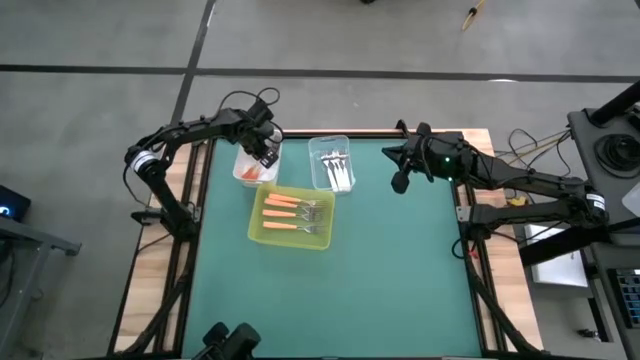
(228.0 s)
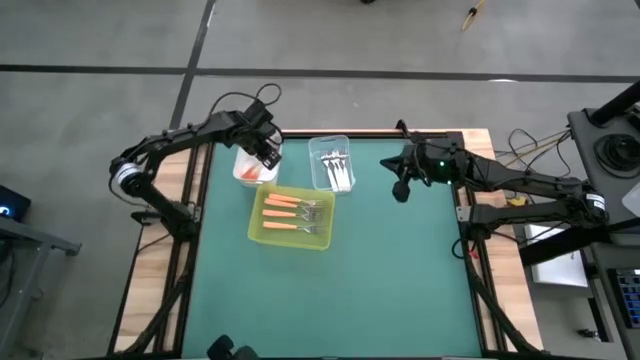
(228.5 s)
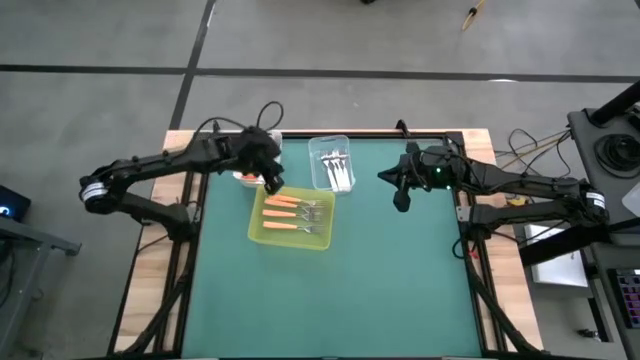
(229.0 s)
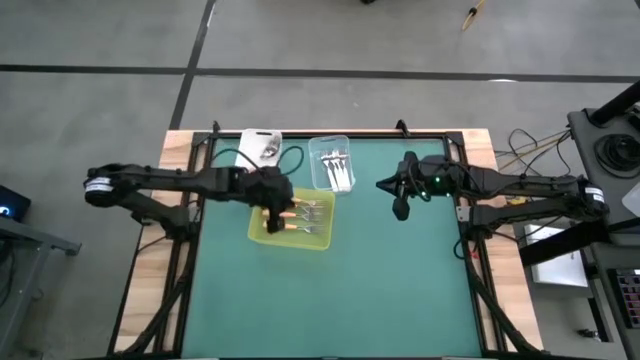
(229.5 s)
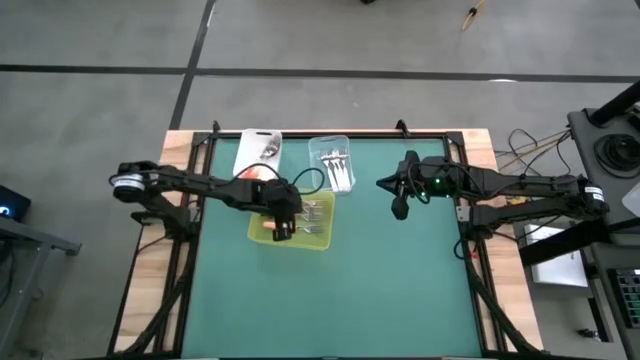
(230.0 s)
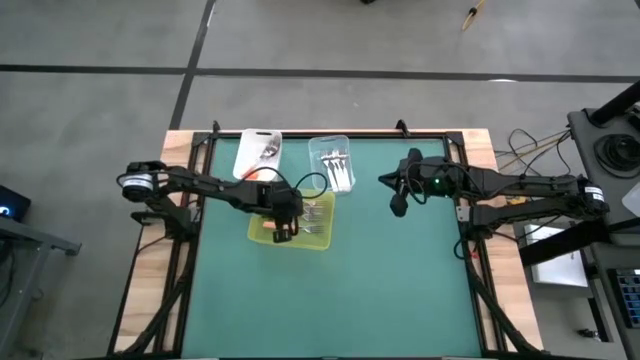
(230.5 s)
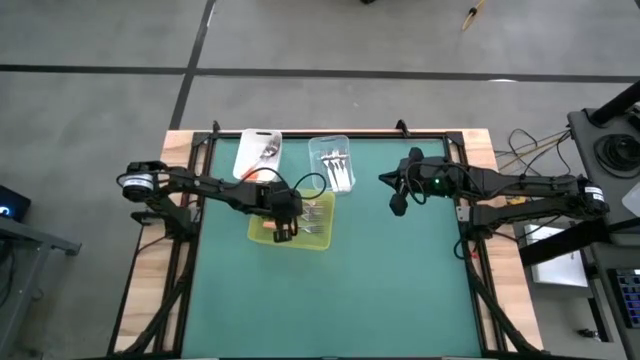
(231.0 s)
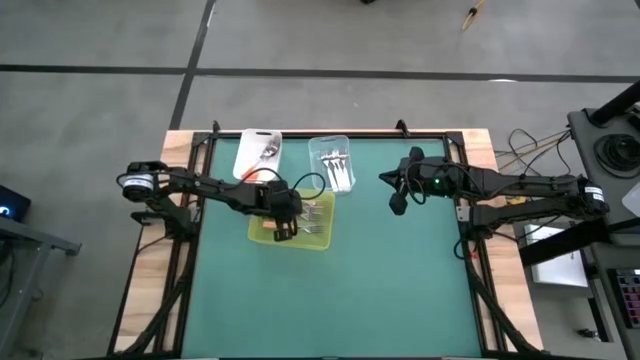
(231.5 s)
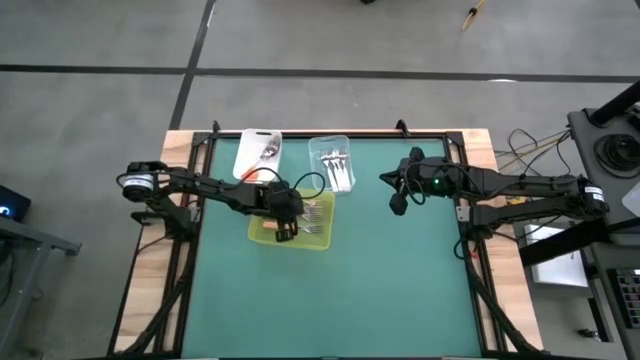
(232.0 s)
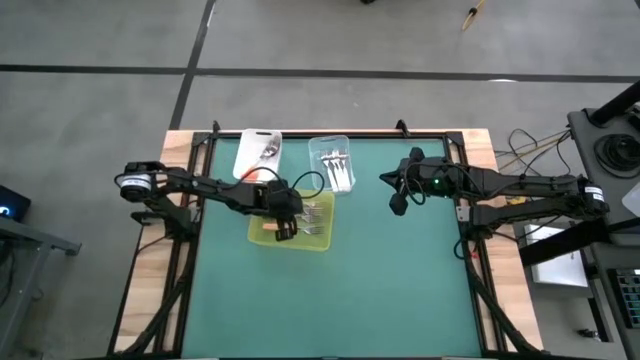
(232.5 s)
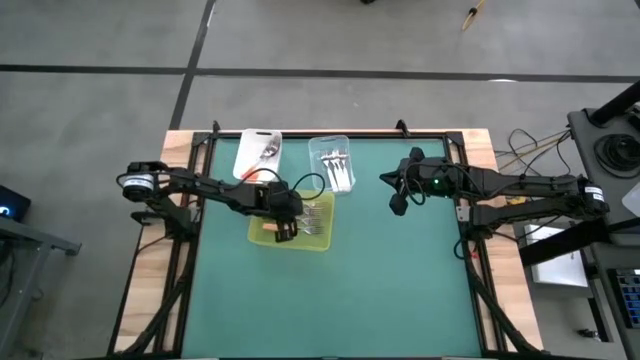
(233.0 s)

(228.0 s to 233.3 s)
Task: Sort silverware by color (type)
Adjust the yellow forks in the yellow bin

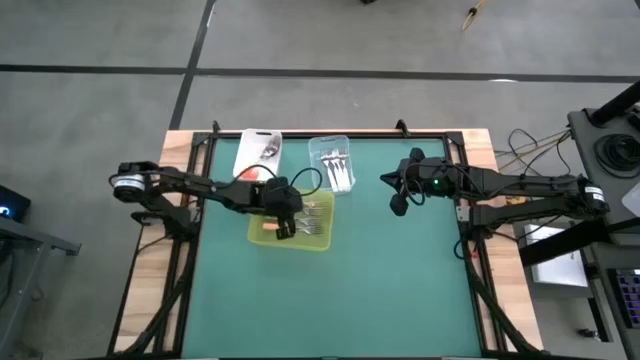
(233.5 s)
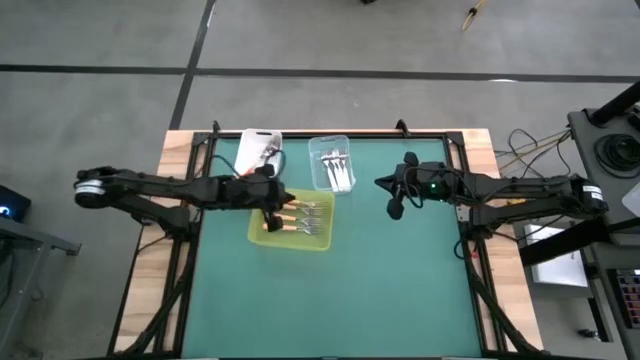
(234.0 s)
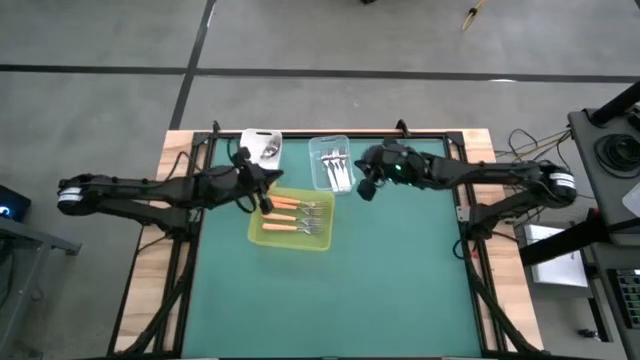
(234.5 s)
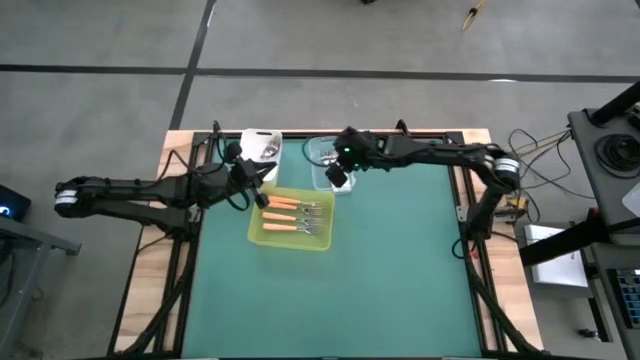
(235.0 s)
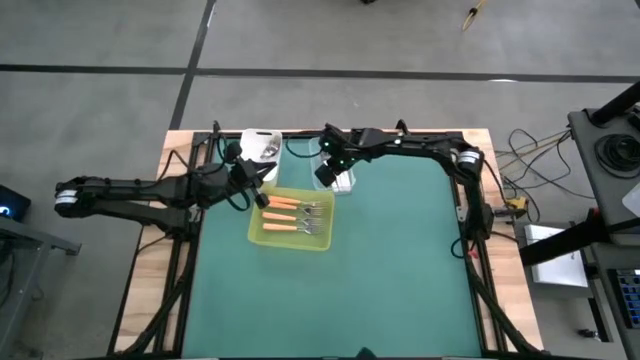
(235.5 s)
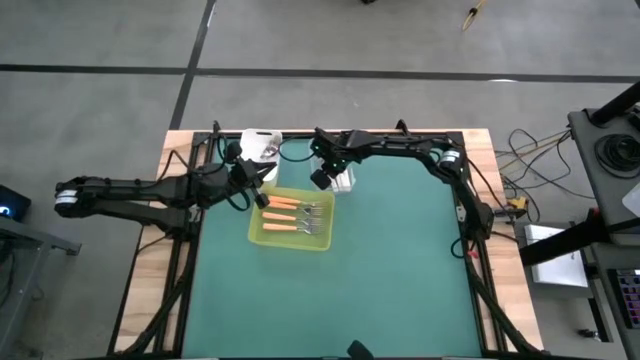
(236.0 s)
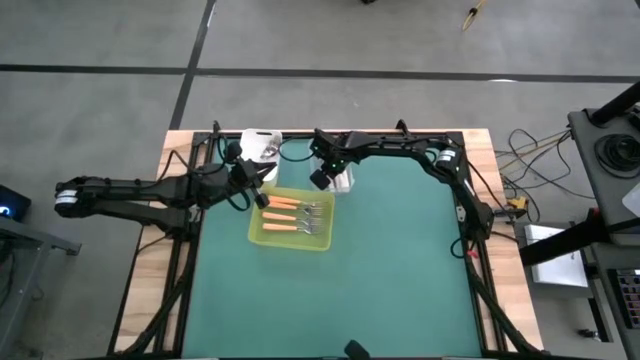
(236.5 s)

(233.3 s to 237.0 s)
Adjust the white forks in the transparent bin

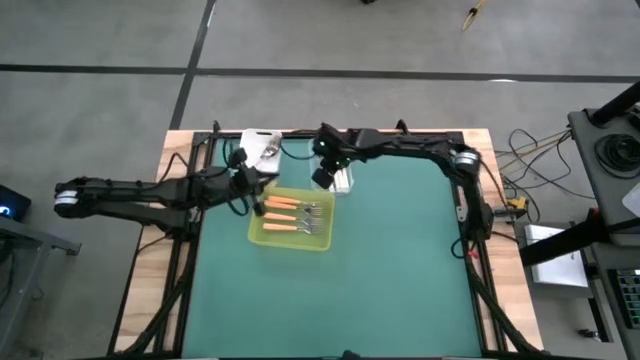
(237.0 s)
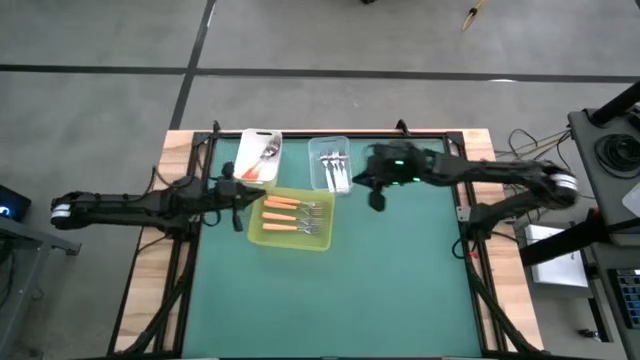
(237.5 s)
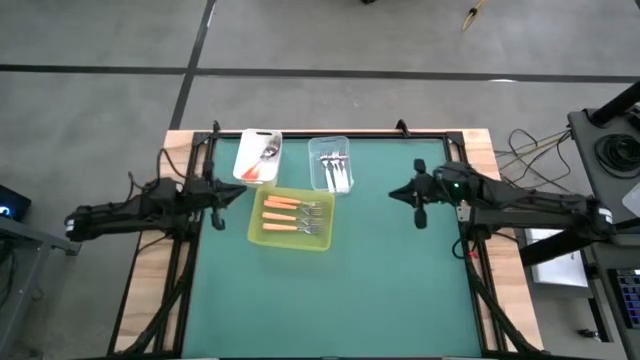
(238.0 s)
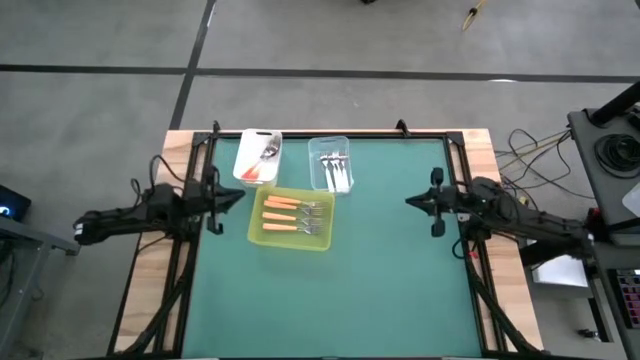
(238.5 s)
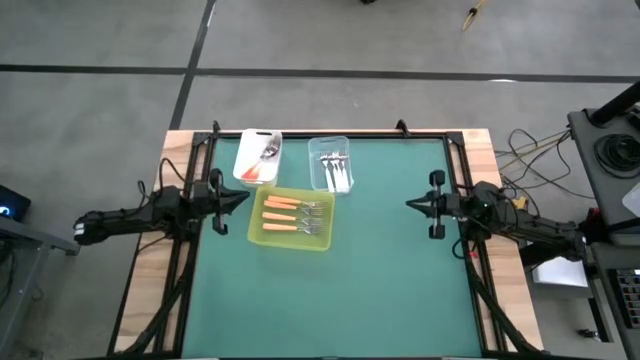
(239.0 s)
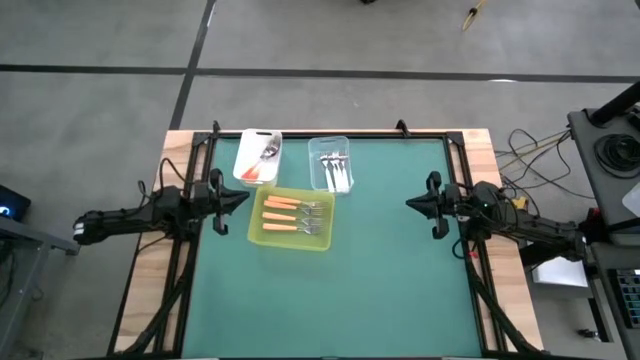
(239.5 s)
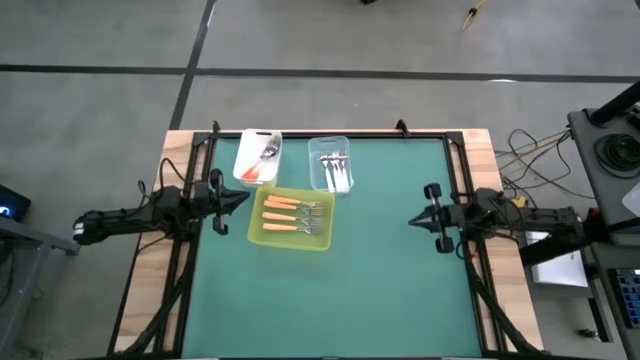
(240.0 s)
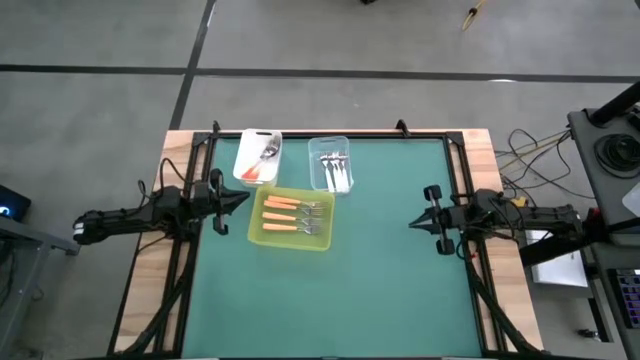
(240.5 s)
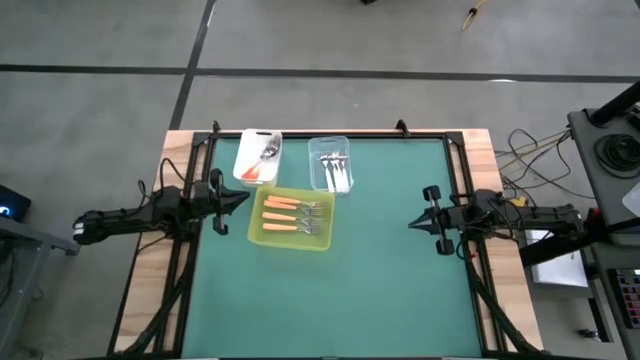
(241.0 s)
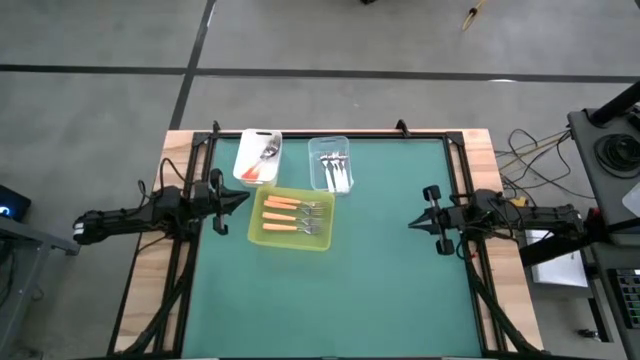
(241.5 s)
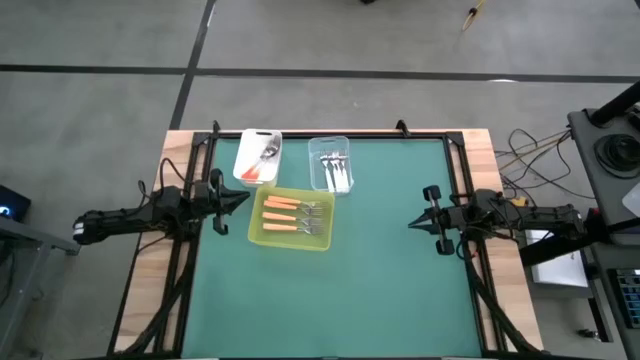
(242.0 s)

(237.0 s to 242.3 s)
Return to Home Position

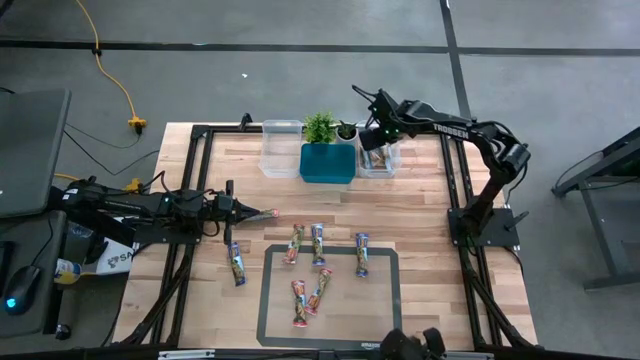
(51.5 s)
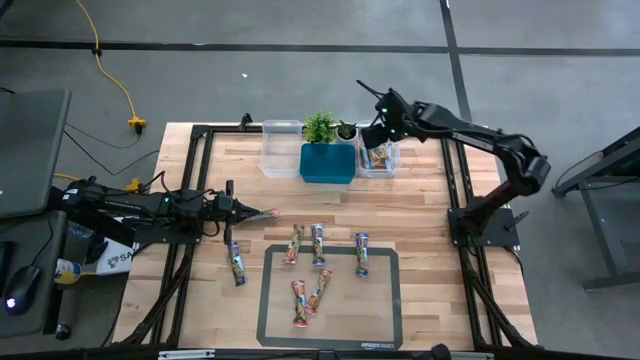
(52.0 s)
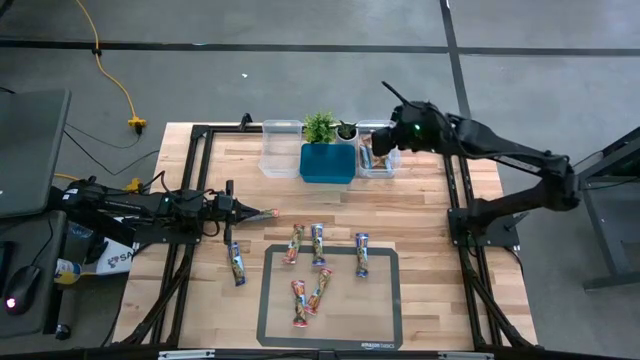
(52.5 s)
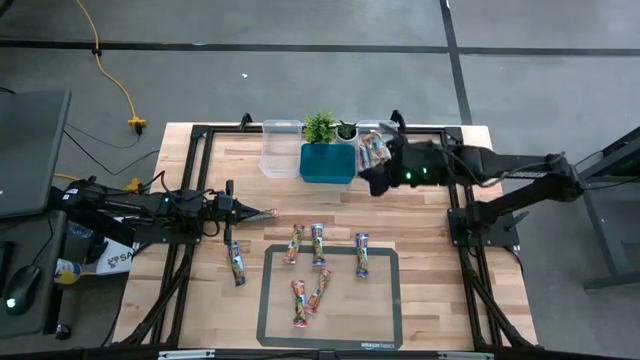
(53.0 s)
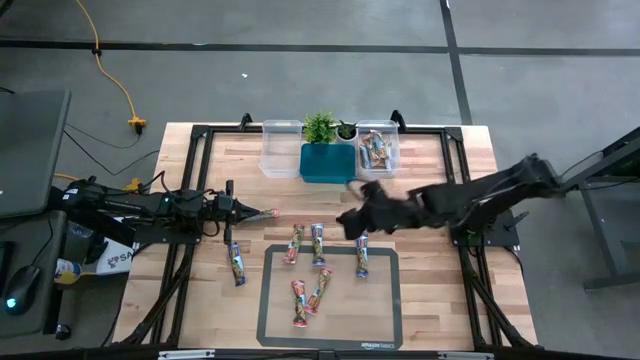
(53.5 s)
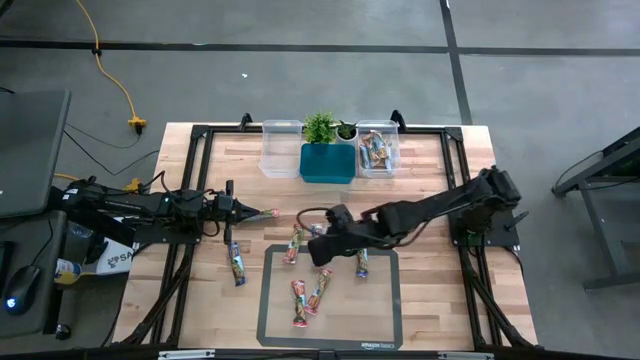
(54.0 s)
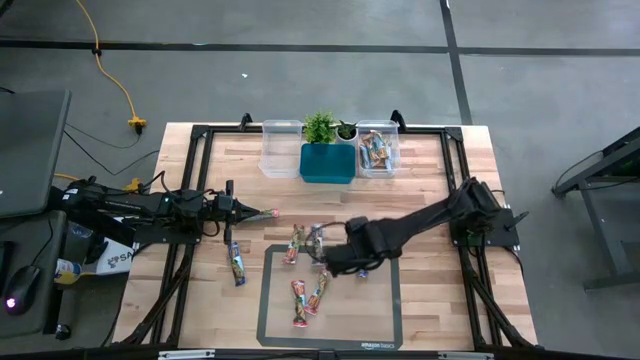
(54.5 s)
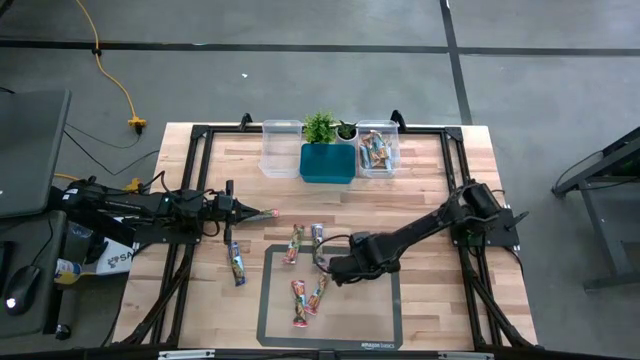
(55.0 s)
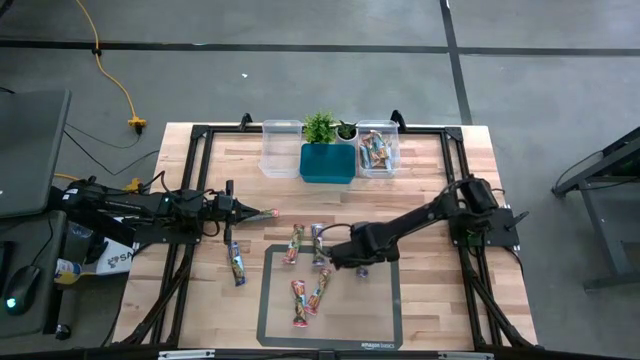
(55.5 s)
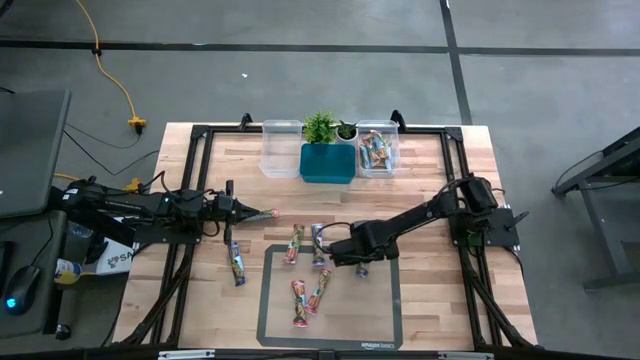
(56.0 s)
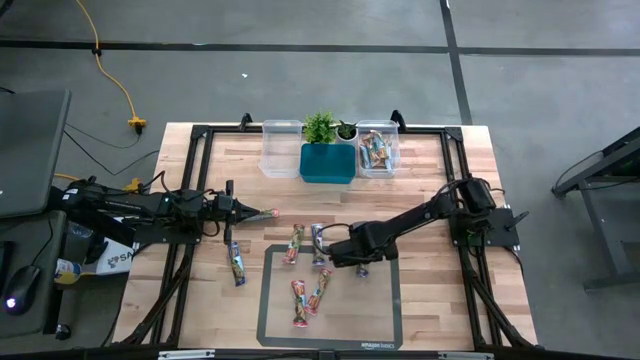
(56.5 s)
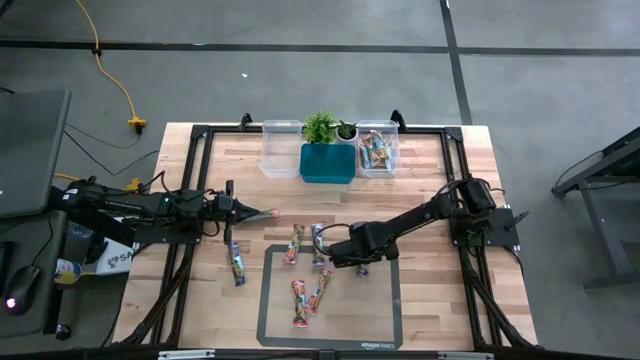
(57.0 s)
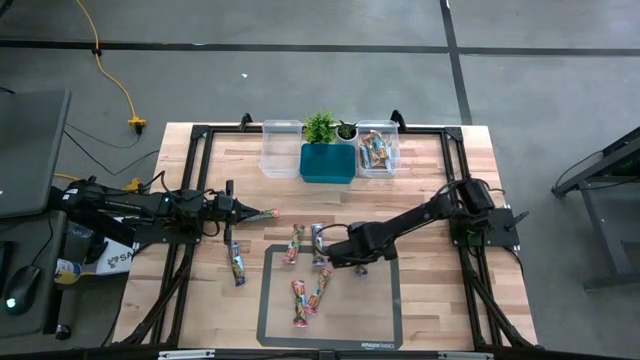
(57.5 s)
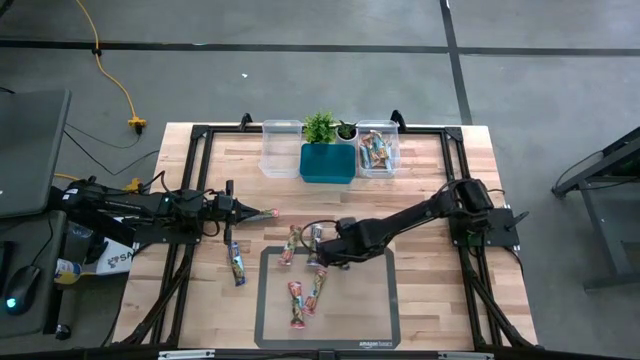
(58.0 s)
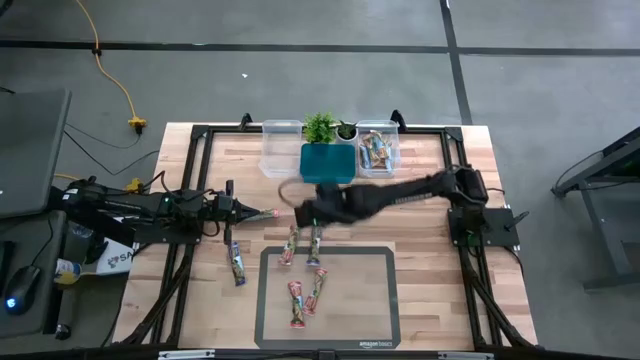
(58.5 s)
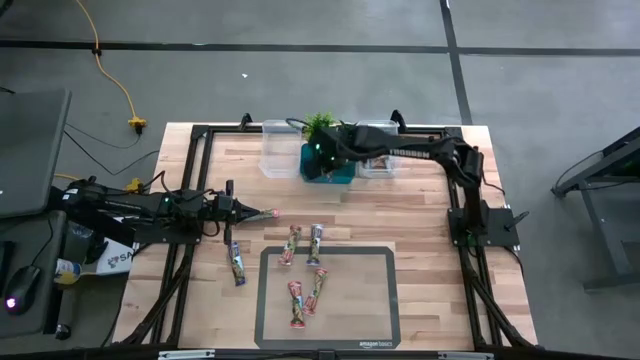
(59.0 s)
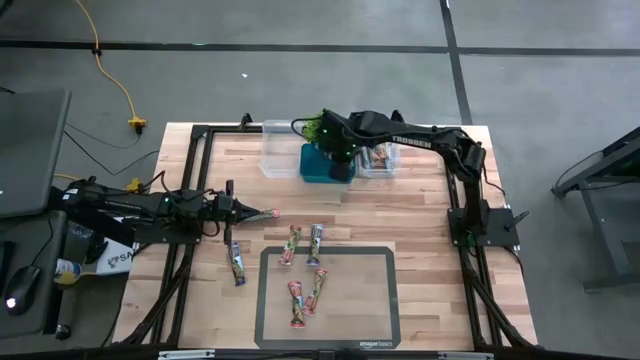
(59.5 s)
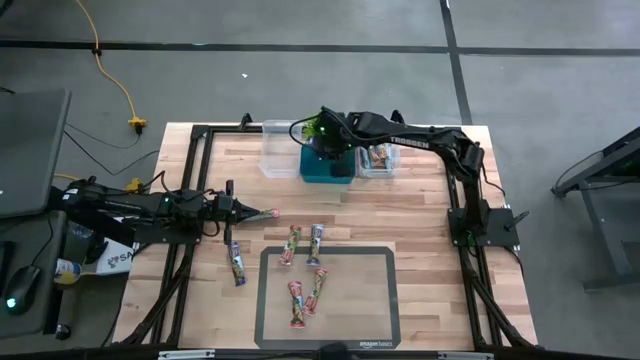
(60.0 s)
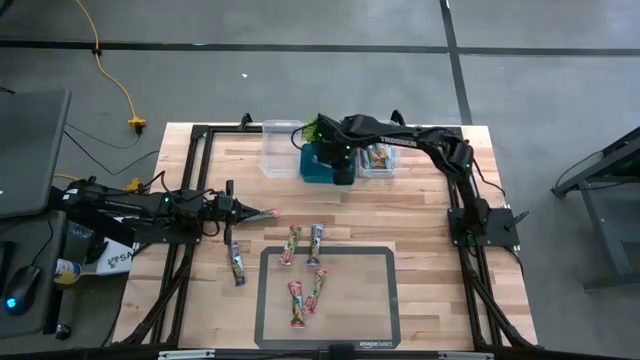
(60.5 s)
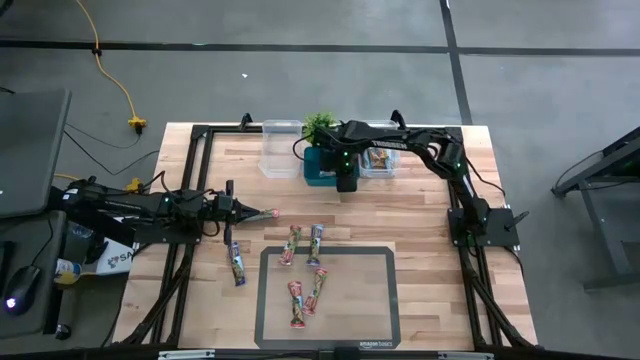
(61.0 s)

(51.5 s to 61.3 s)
Task: Pick and place Granola Bars by type
Put the blue granola bar into the blue bin
